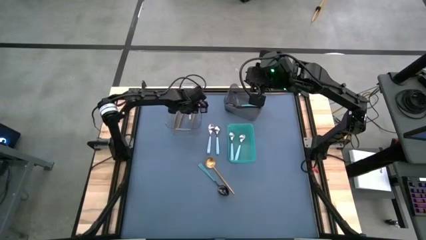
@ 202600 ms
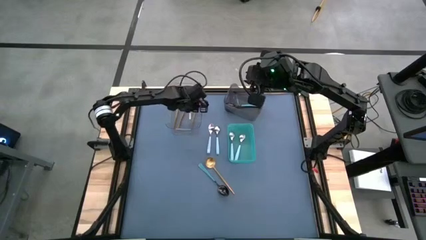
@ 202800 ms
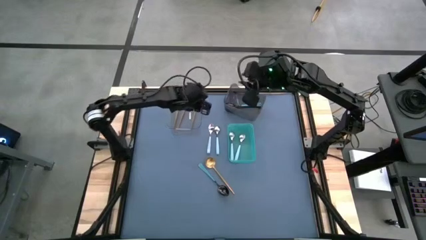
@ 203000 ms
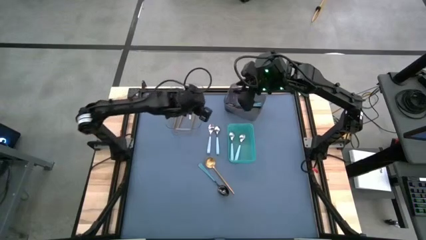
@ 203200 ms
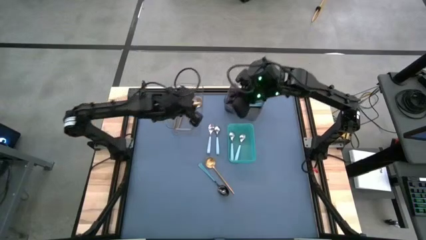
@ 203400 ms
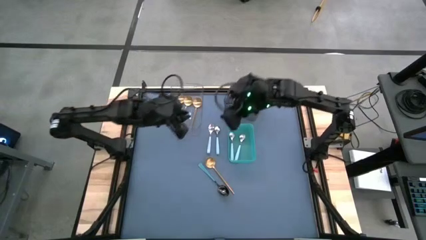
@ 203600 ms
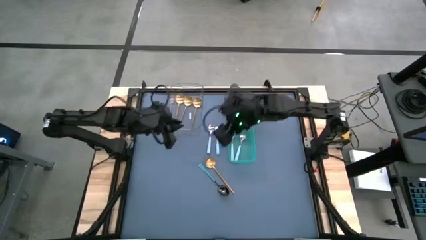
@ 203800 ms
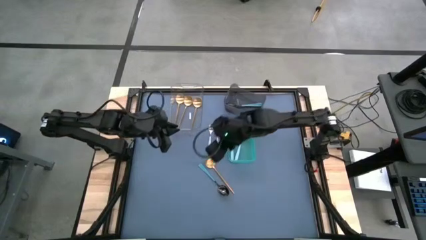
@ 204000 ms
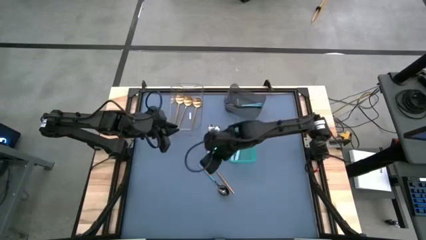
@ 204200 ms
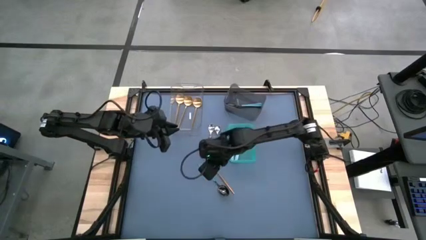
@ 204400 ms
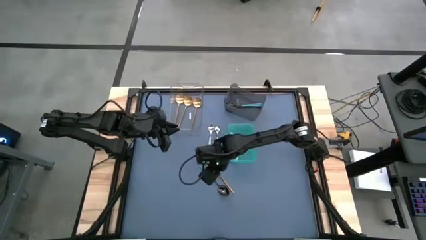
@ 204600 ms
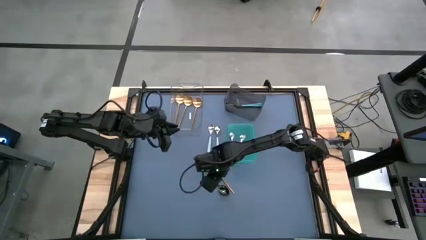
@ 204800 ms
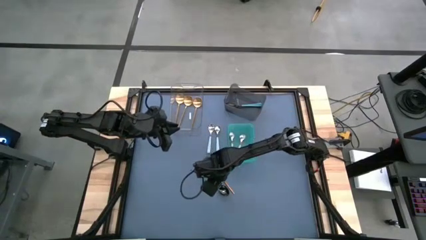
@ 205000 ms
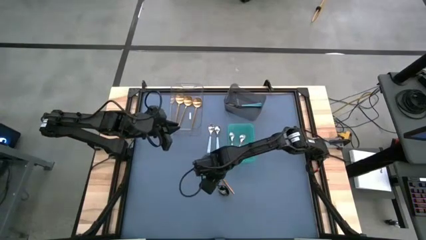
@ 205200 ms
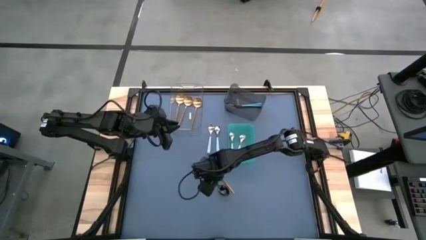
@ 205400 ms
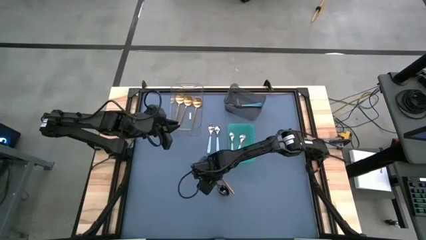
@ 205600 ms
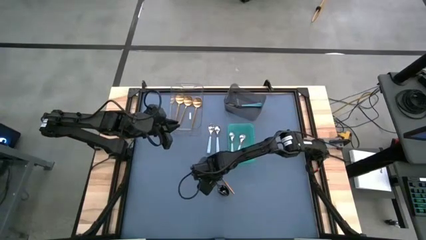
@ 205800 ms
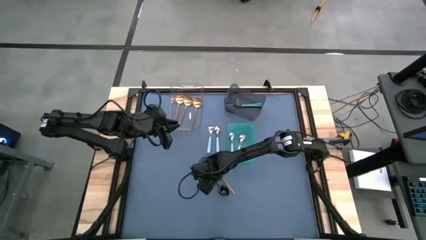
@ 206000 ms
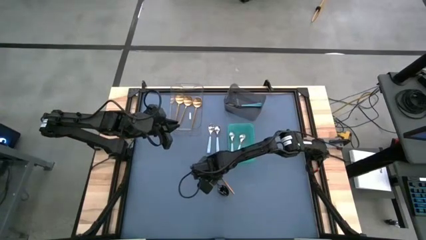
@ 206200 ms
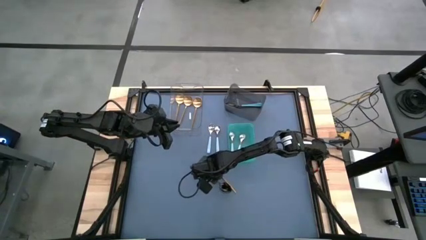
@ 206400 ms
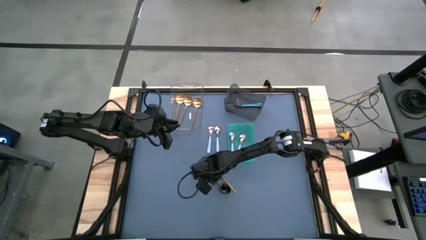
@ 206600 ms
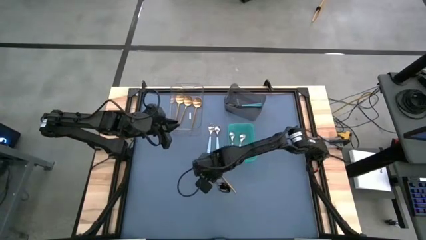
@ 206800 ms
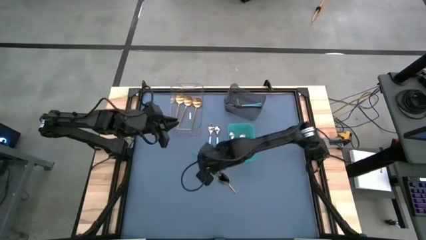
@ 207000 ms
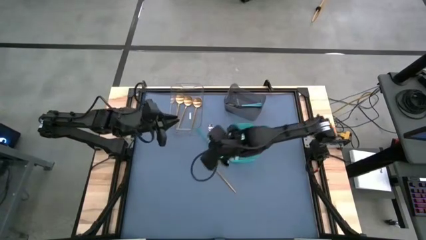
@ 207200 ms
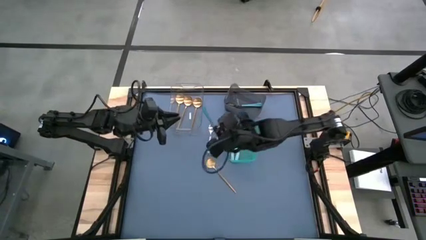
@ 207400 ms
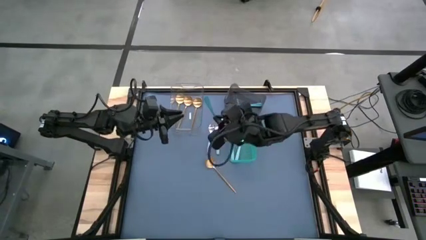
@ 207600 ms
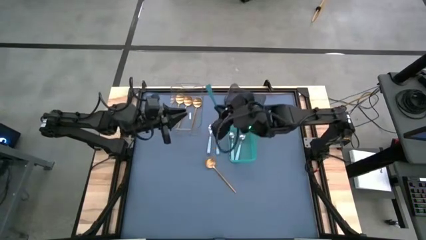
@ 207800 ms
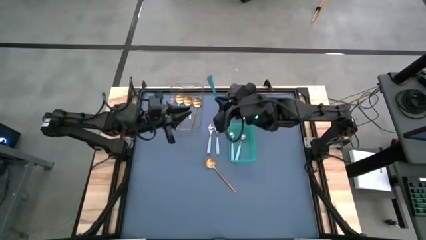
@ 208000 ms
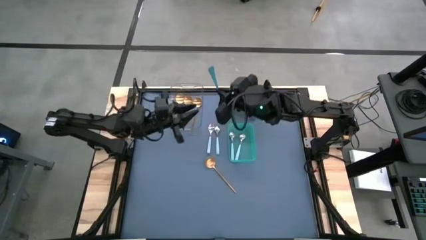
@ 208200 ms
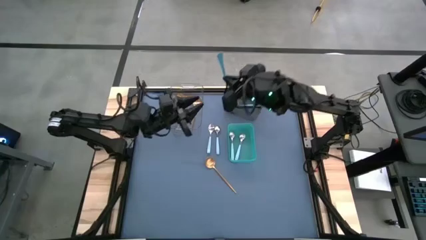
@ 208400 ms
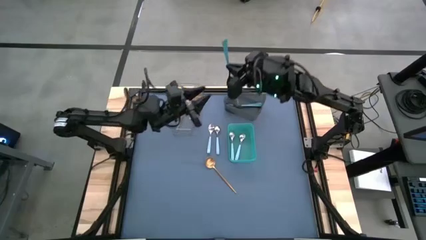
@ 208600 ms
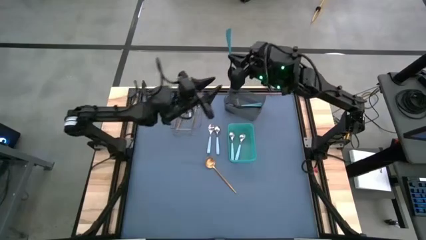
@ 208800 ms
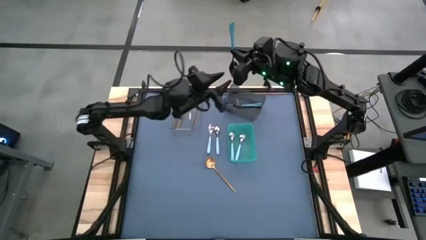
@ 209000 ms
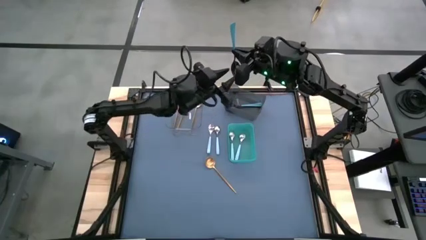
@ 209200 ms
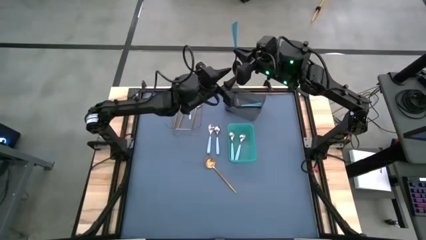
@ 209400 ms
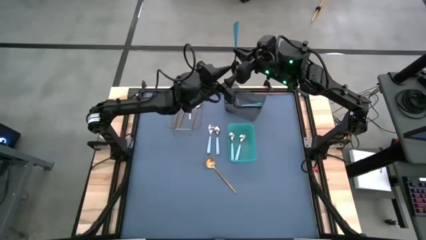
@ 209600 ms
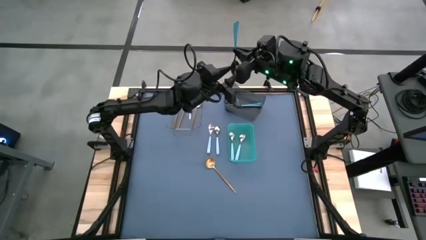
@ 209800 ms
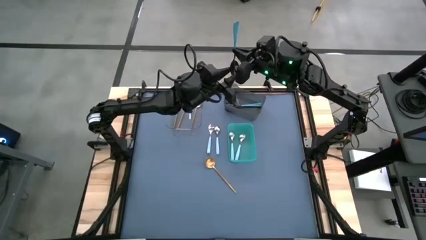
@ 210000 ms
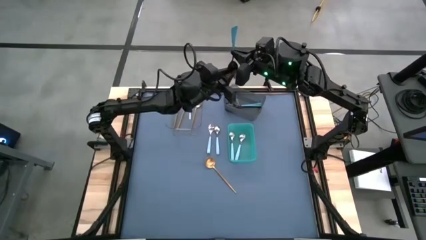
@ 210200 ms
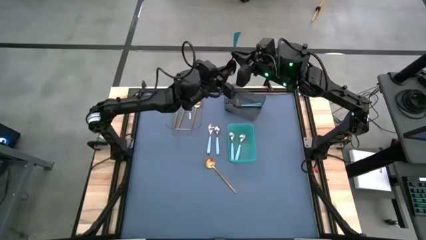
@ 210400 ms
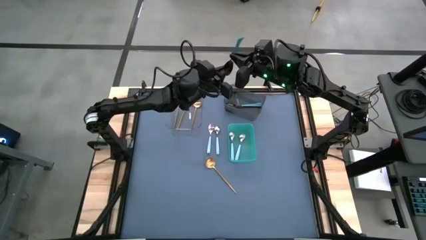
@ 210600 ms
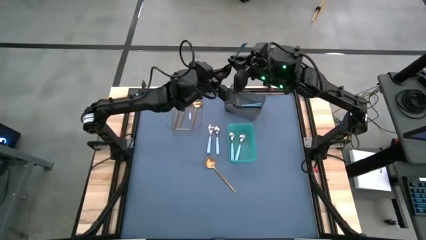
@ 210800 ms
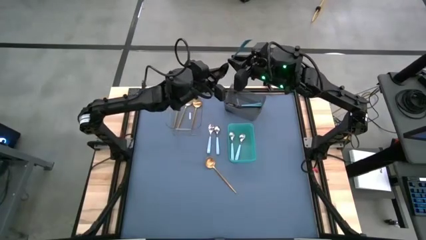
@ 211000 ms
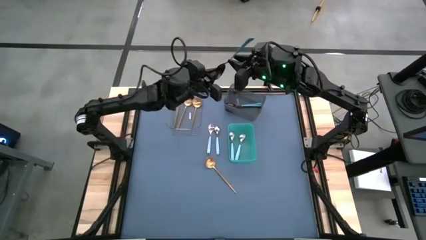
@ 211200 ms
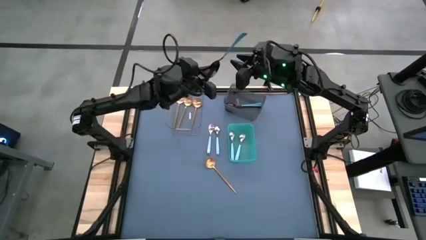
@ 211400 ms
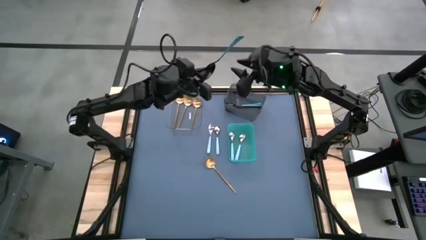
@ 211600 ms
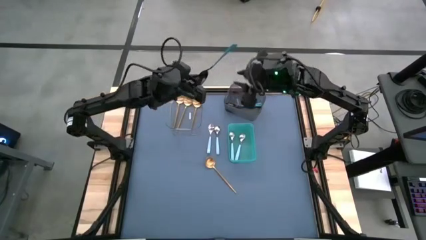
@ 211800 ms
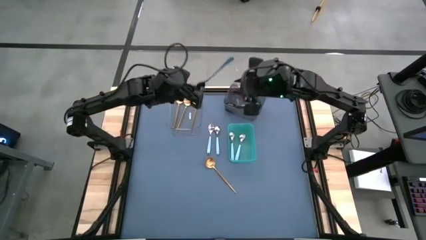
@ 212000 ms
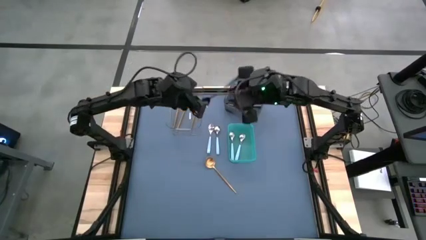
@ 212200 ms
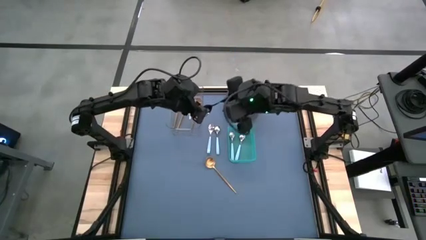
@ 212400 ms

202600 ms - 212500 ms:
Task: Sort silverware by color (type)
Put the blue spoon into the black bin
